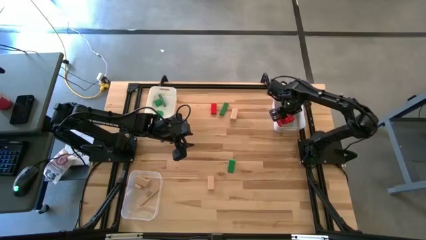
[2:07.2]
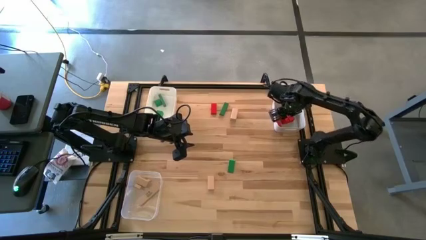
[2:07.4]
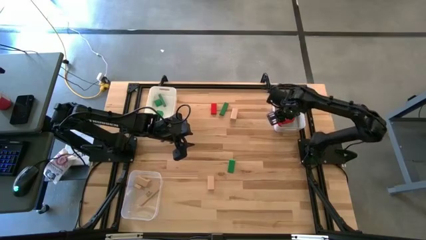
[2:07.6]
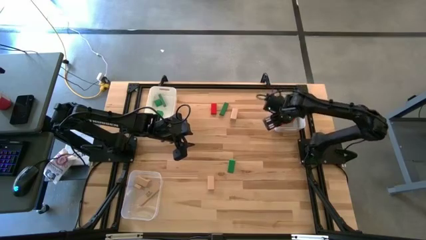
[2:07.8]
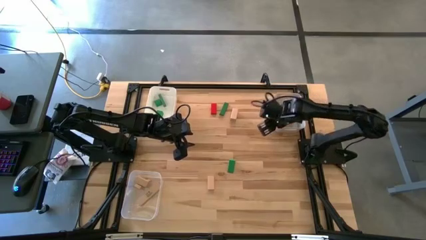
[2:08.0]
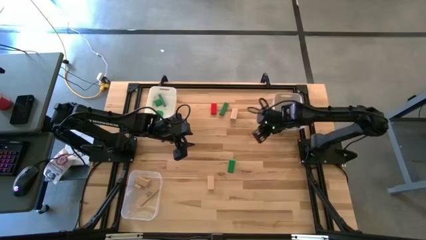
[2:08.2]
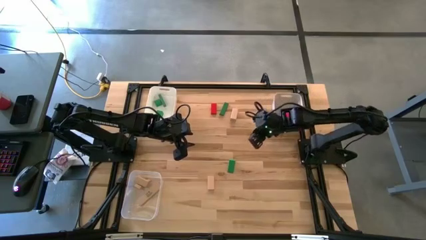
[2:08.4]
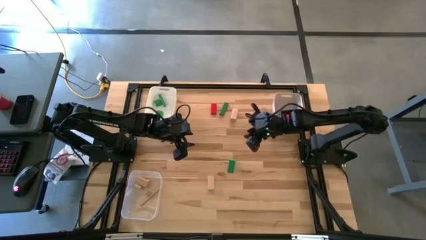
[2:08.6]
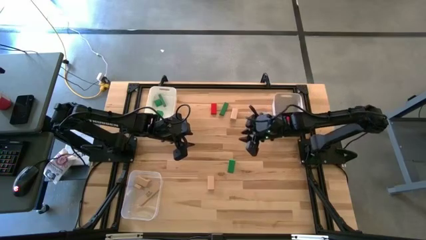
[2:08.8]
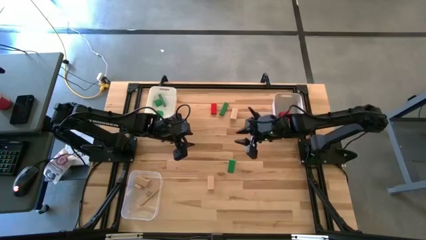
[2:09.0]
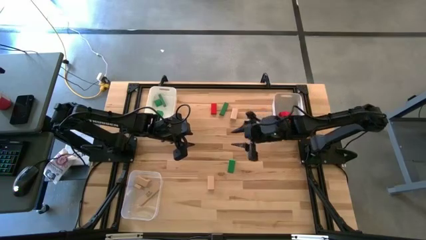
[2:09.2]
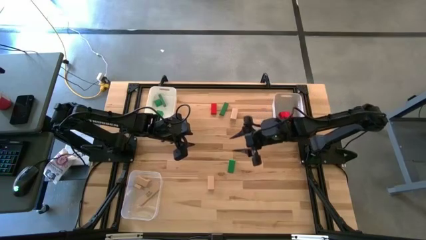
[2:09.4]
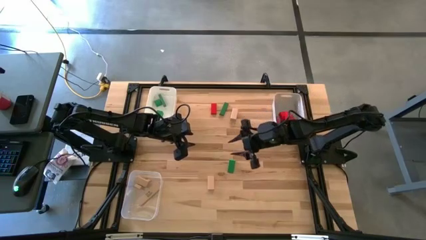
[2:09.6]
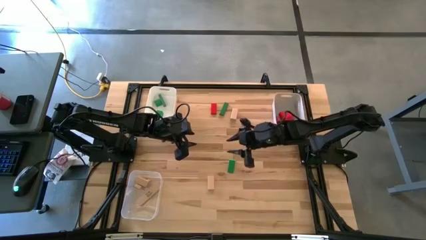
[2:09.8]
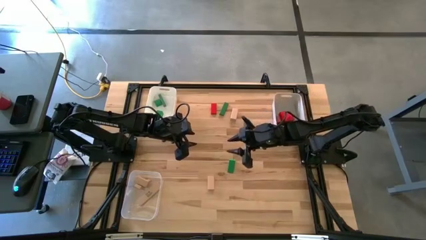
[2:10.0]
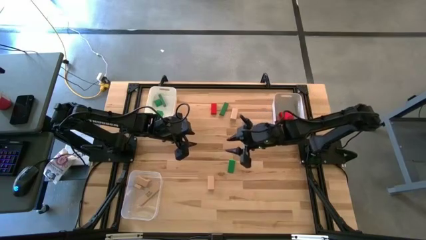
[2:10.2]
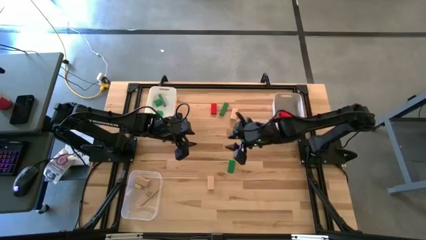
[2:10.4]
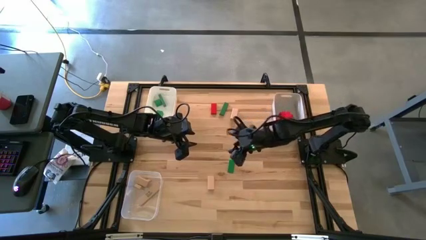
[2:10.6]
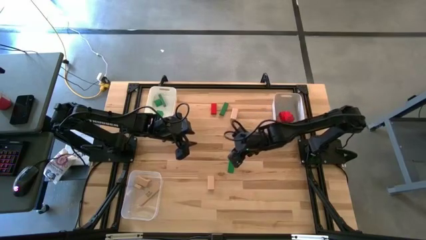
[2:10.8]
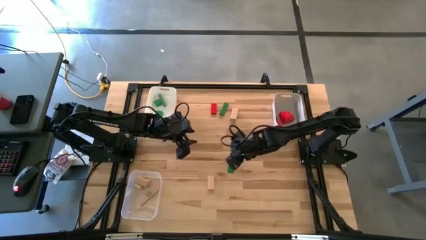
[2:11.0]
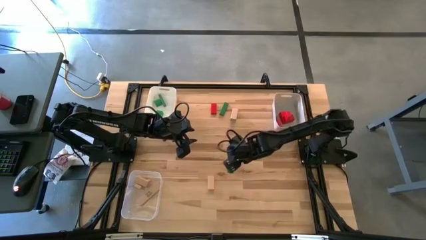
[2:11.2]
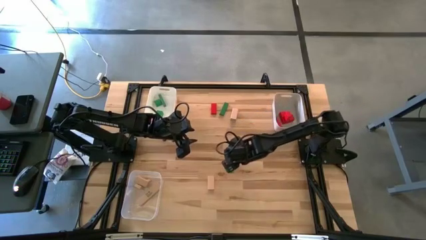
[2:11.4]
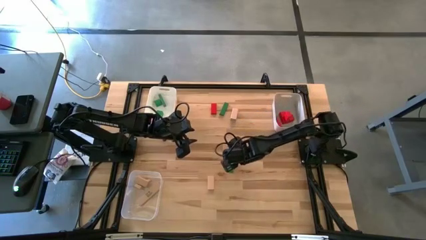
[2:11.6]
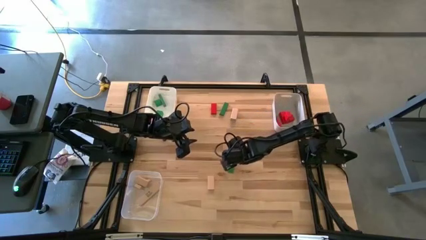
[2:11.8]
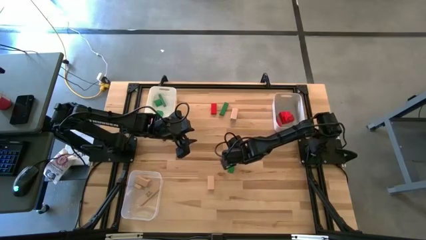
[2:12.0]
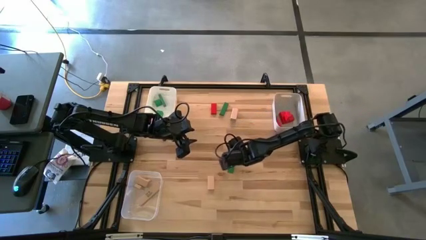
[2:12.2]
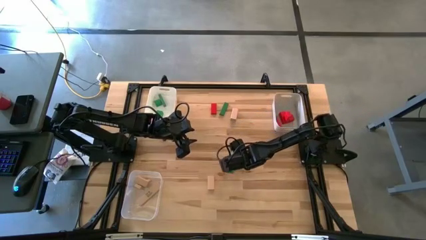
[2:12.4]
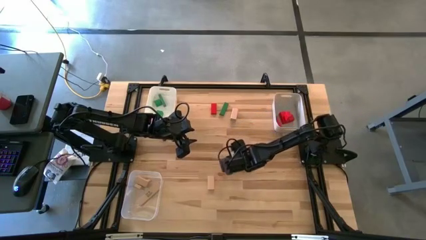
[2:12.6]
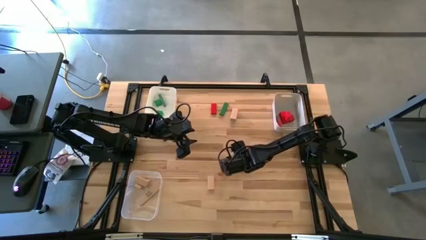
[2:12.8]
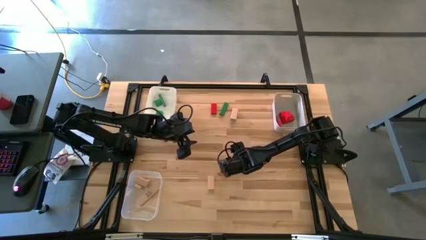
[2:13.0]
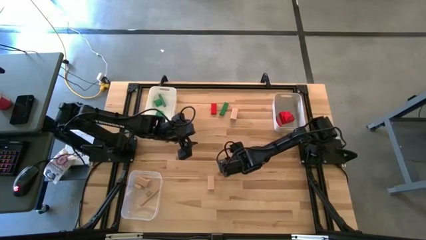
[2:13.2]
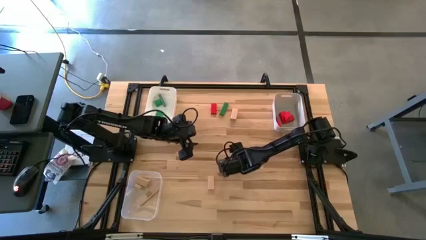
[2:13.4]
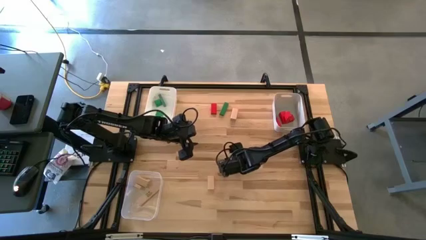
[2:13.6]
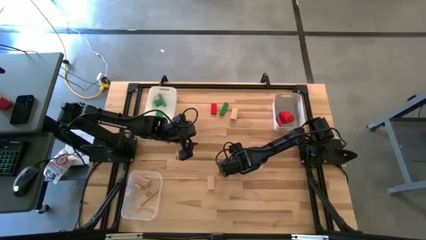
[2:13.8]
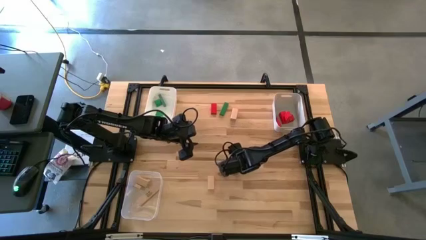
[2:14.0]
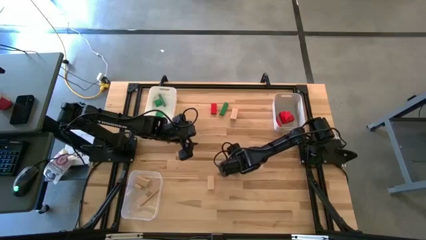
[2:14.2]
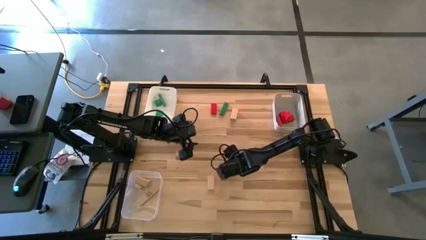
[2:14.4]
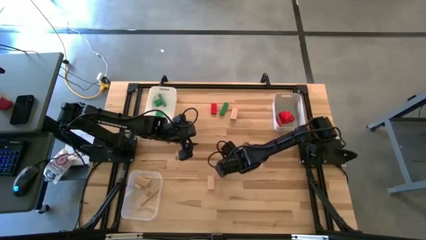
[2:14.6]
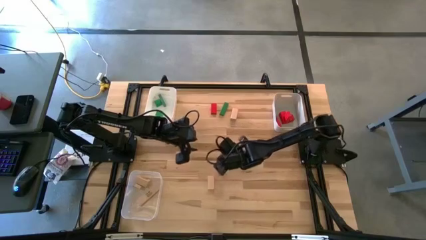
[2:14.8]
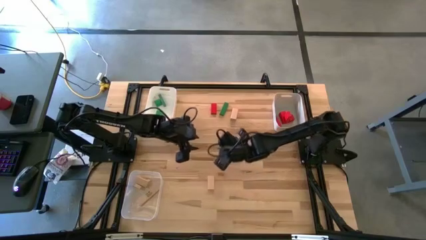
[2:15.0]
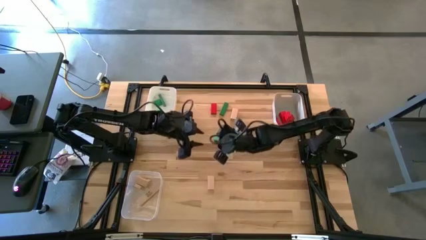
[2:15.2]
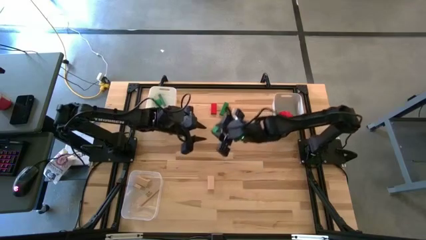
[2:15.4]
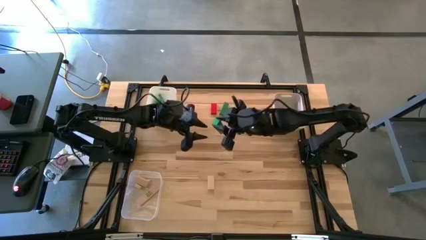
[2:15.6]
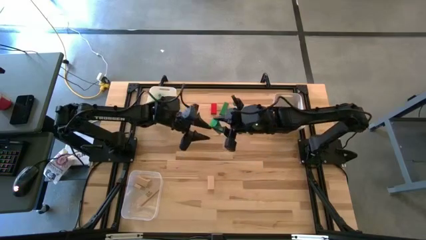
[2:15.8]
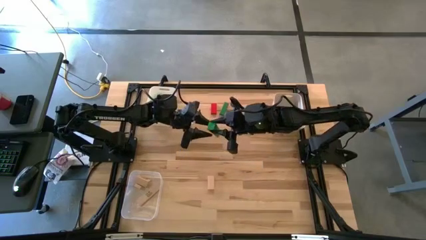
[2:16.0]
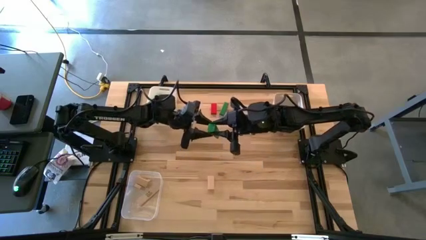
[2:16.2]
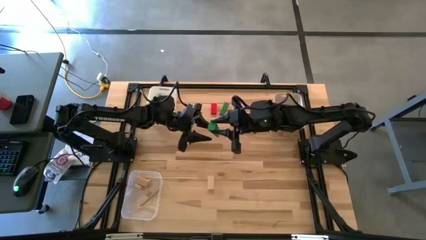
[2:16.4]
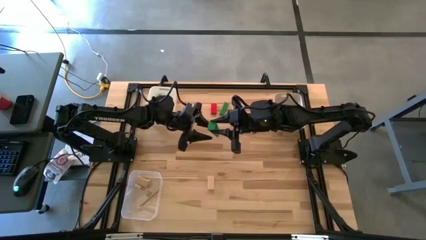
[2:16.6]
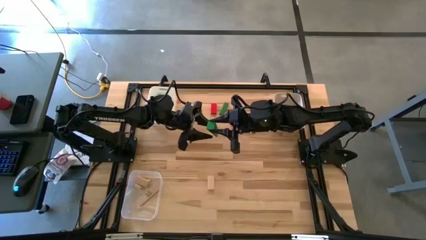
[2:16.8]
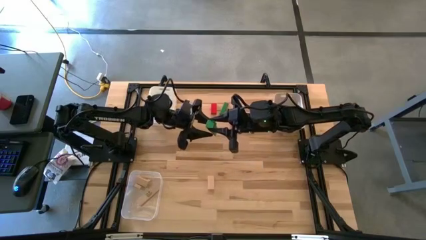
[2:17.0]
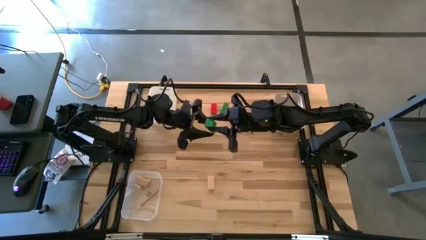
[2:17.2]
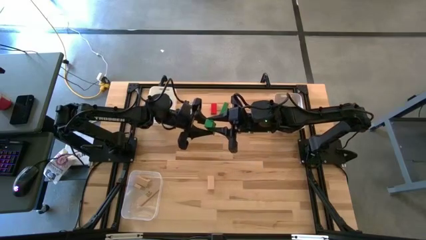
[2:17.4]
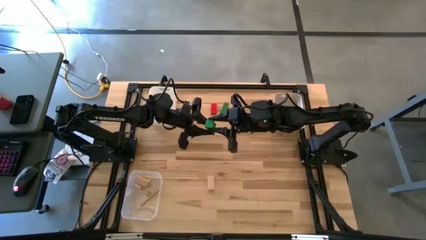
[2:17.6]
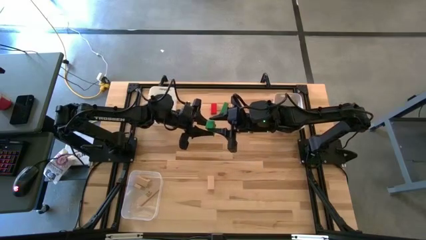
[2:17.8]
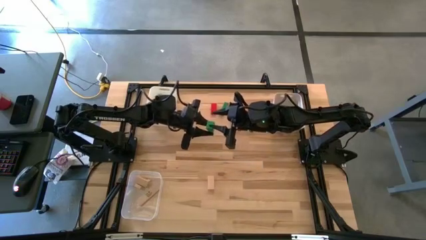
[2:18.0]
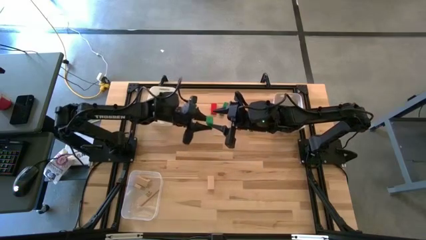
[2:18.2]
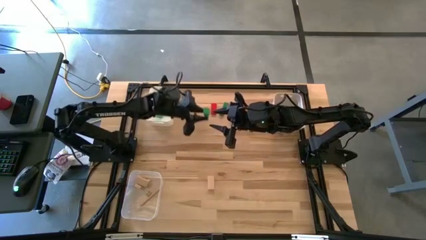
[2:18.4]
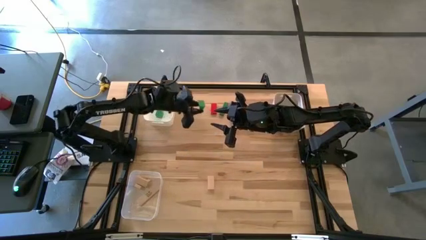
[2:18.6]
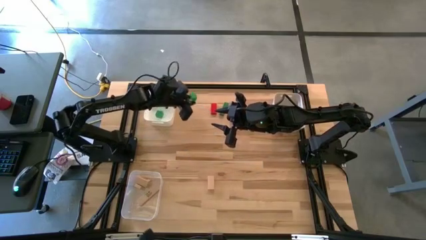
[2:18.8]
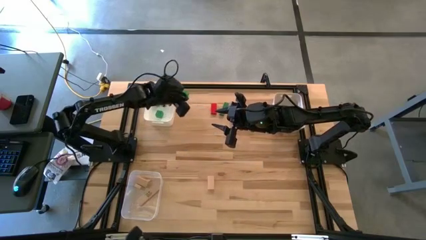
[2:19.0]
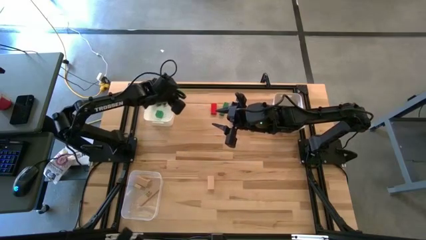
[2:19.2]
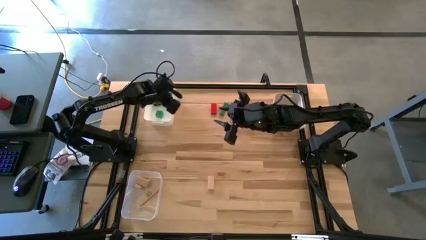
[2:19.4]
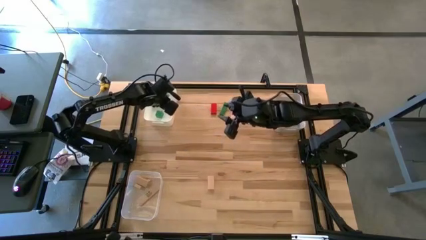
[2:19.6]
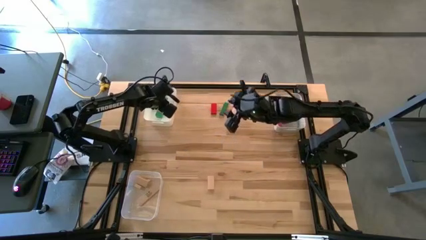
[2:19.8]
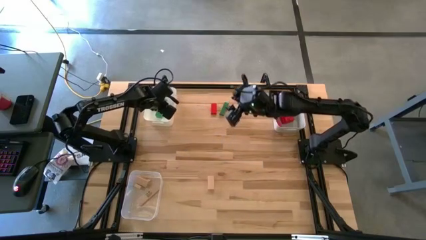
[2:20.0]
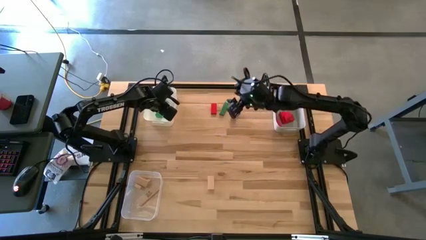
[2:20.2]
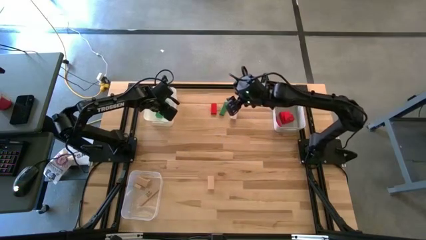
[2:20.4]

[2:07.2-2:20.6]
Task: Sort & place blocks by color
Put the green block into the white bin
